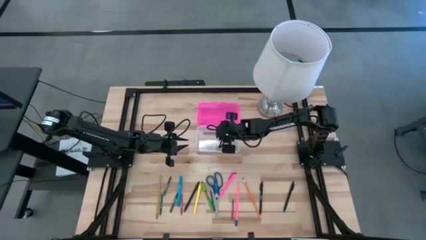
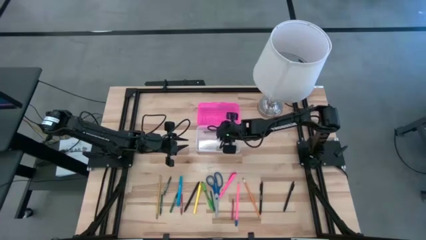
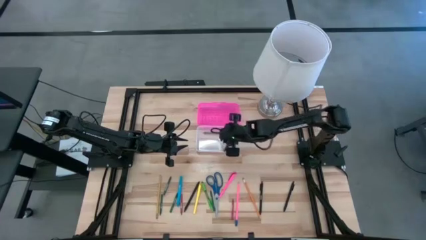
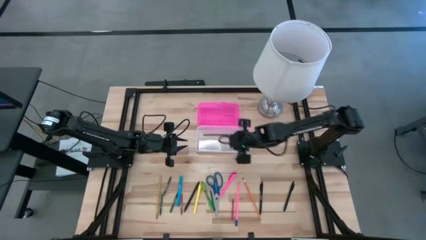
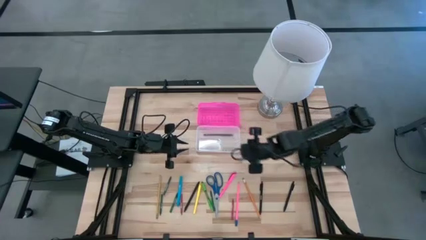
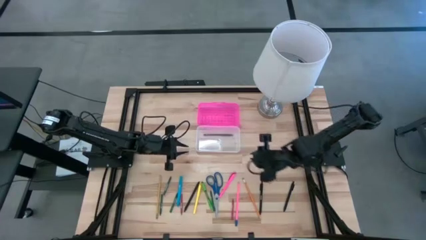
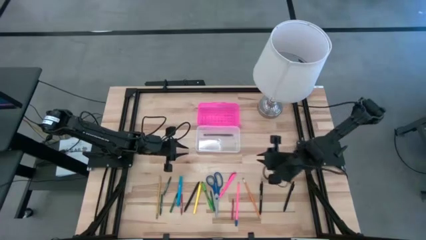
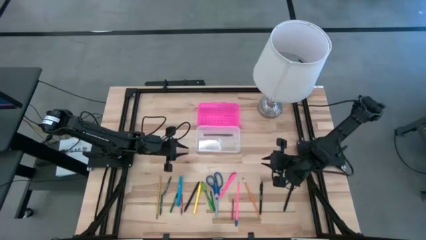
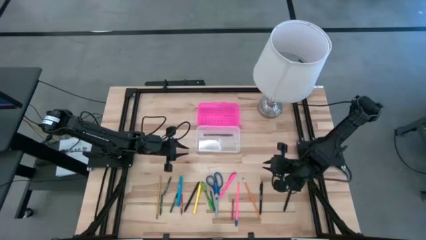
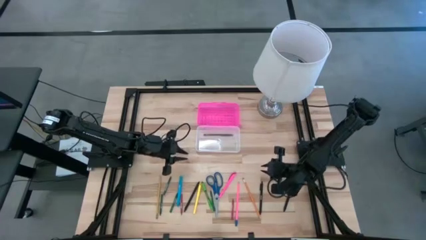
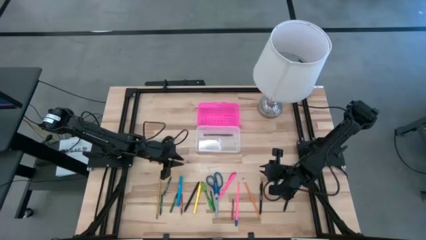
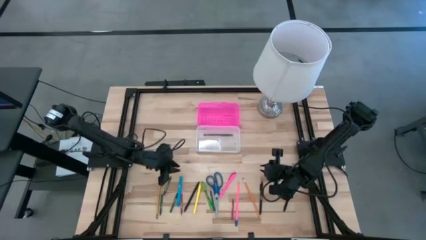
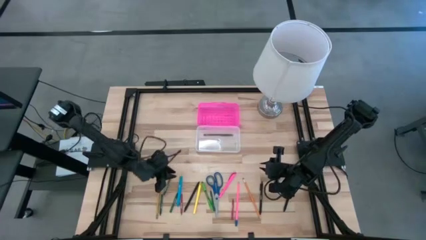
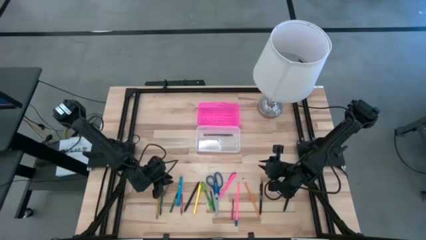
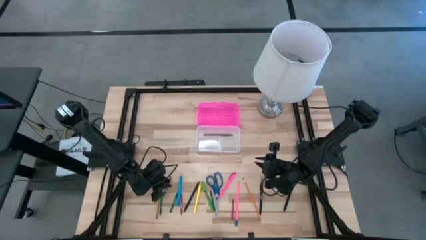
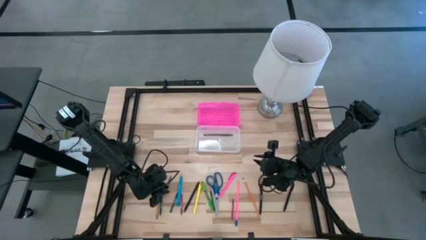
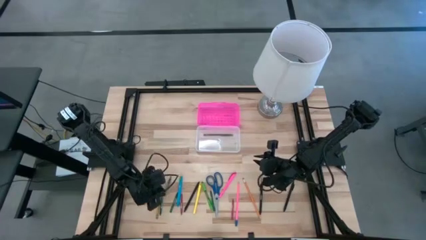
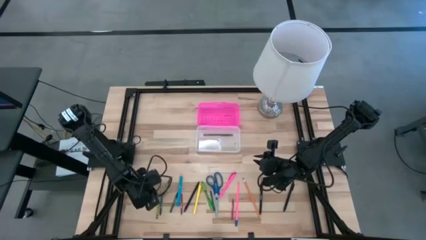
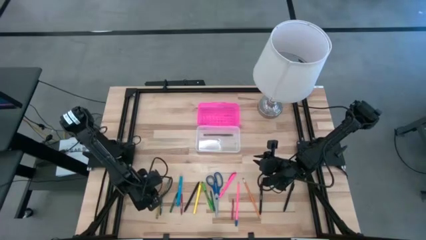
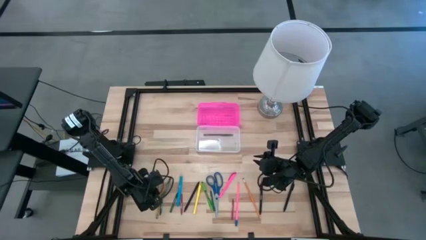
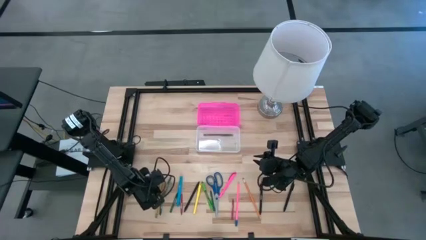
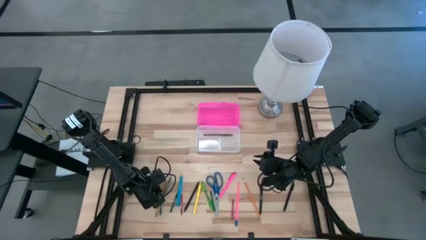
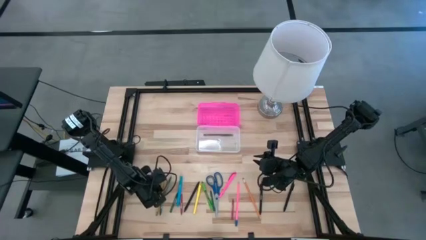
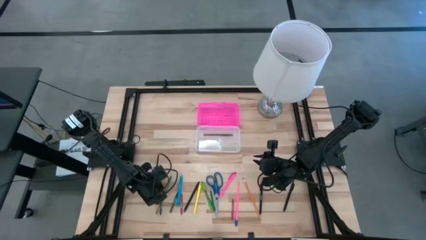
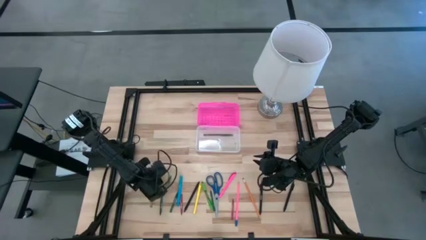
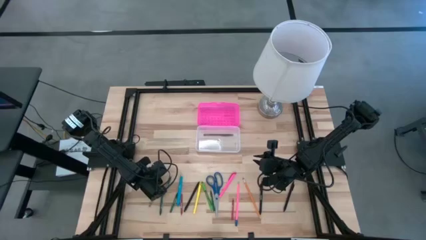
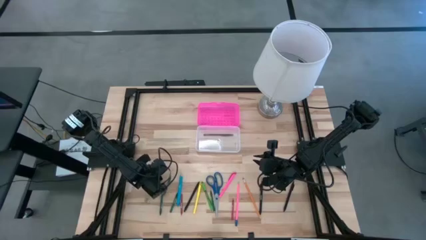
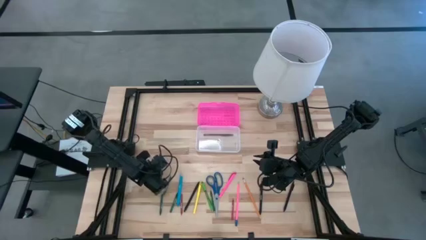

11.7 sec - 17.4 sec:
Task: Pick & place school supplies into a supply box
Put the yellow pencil into the supply box

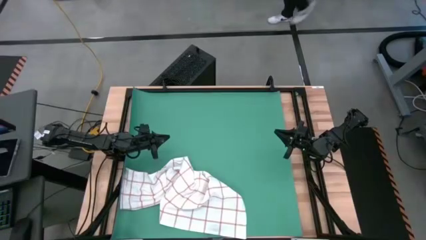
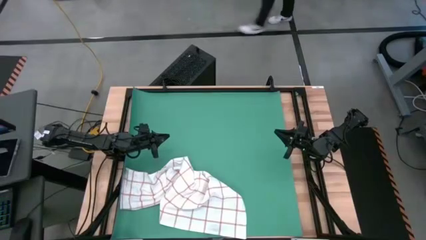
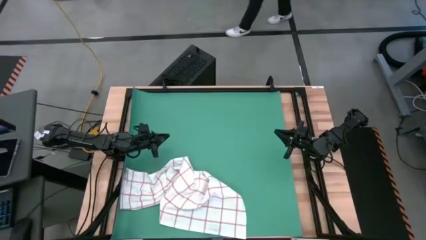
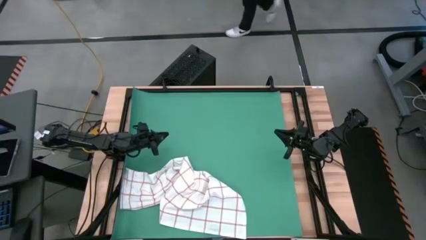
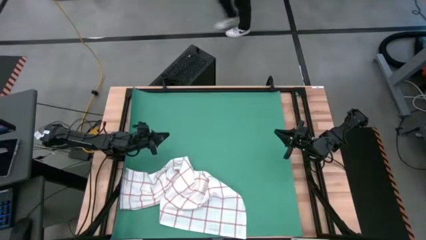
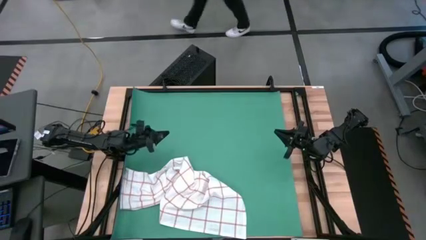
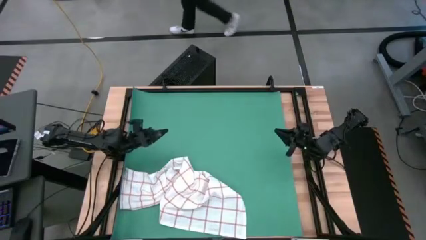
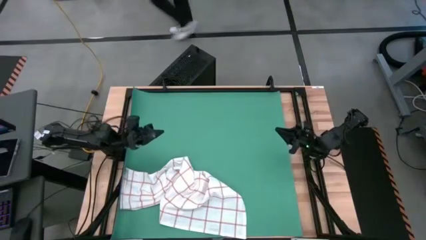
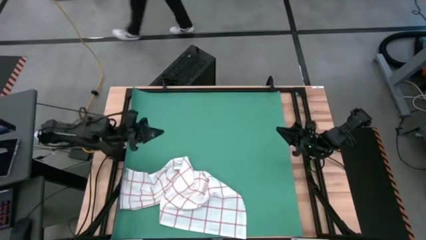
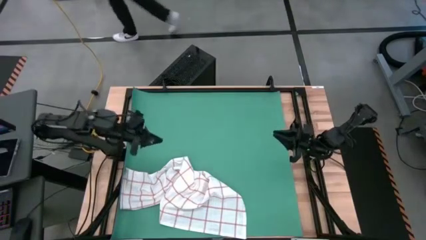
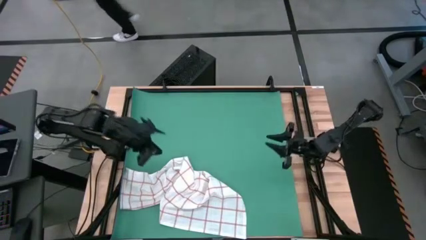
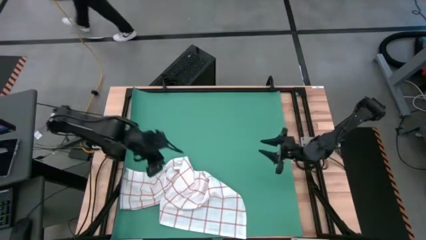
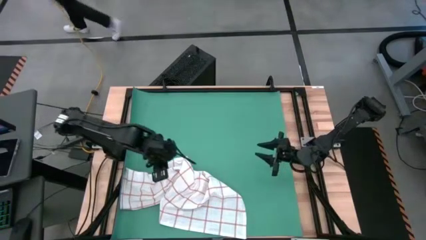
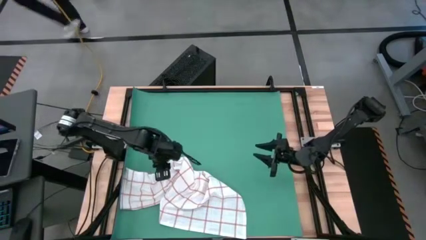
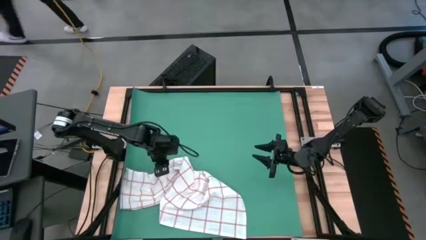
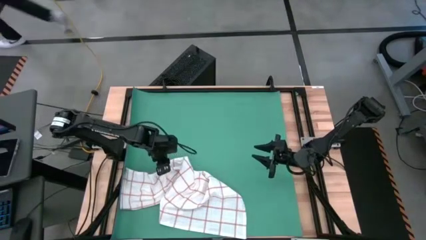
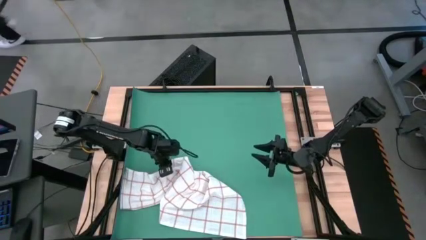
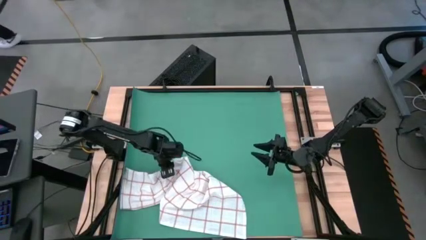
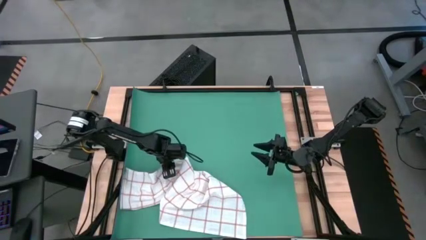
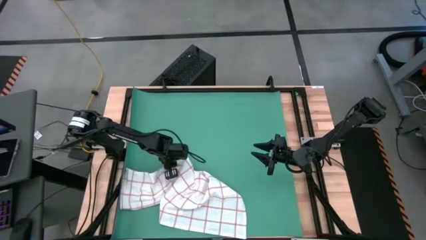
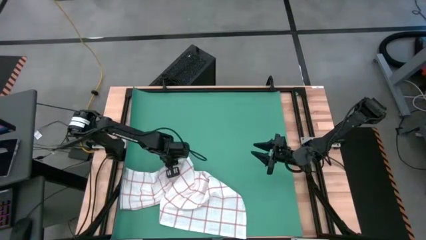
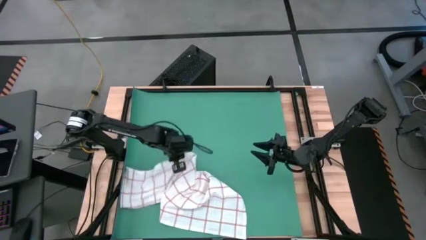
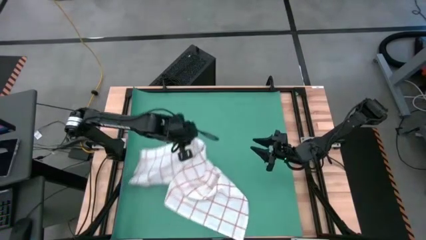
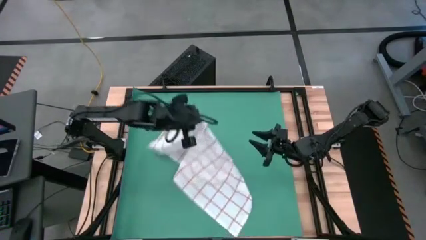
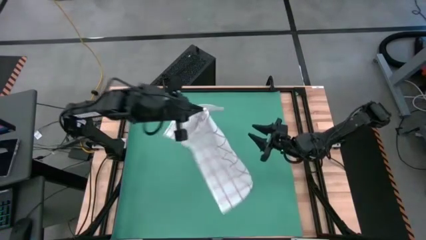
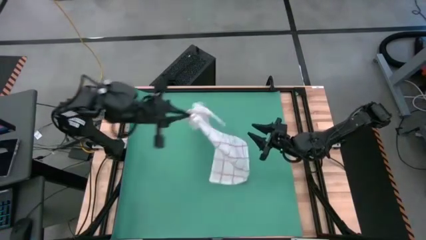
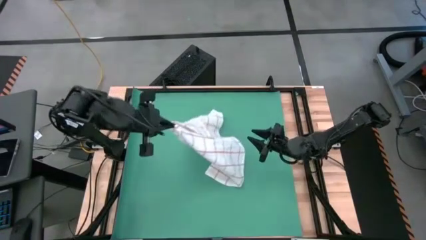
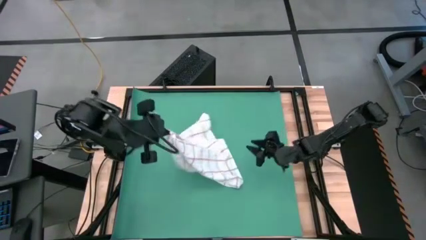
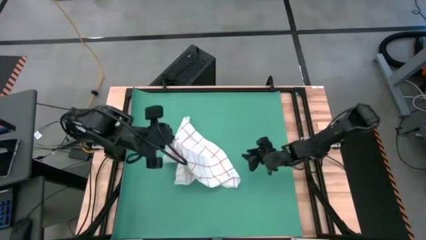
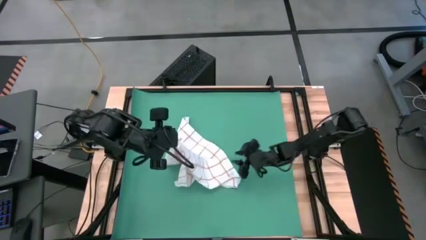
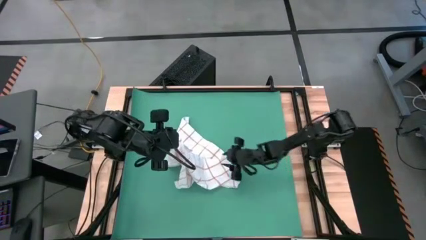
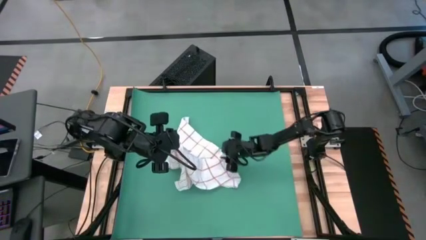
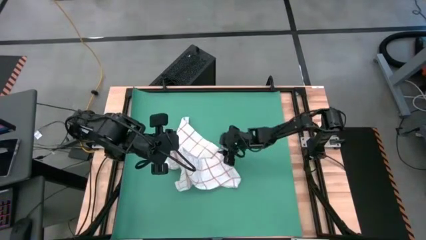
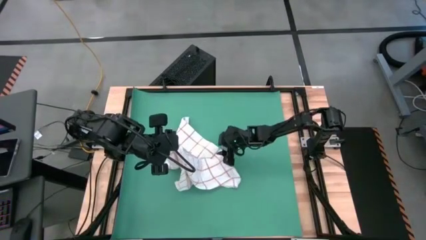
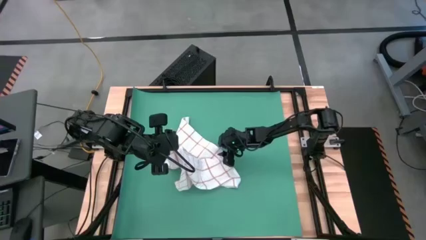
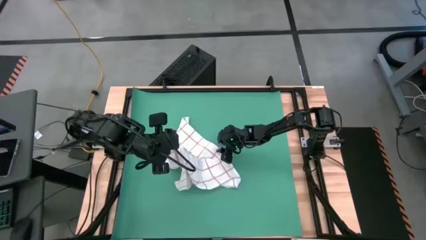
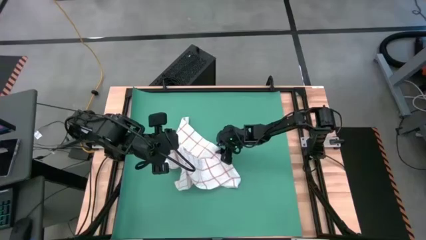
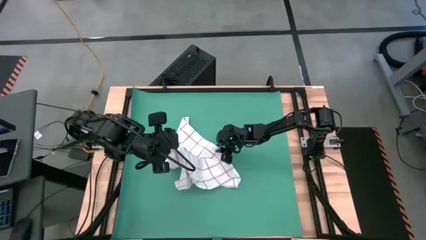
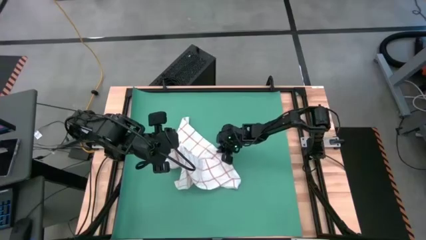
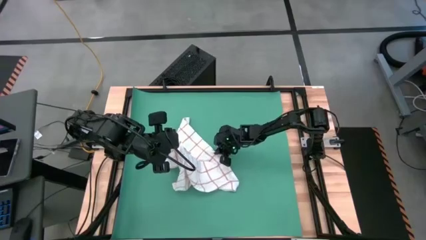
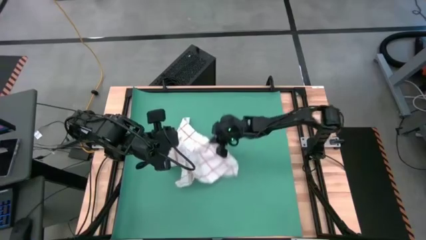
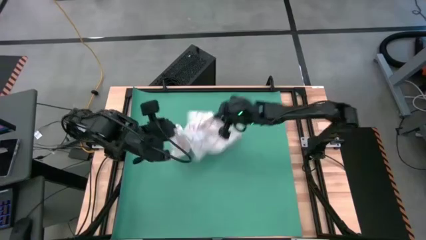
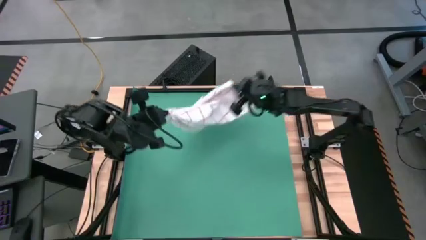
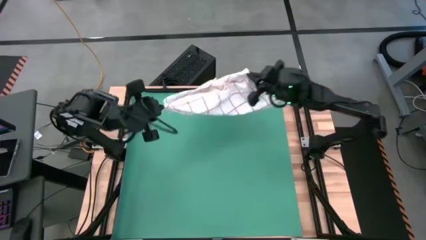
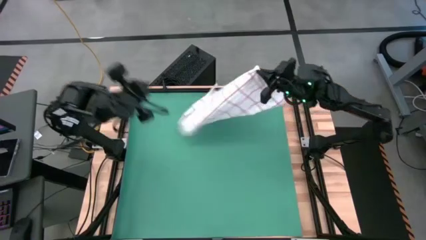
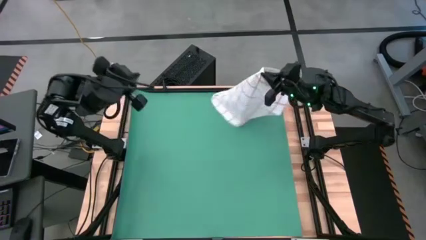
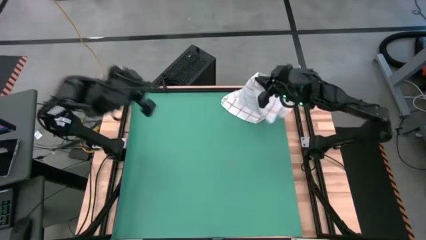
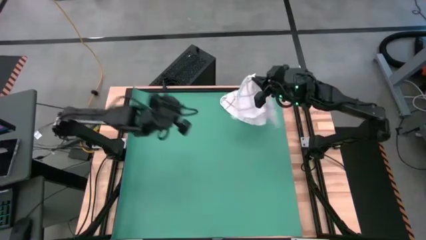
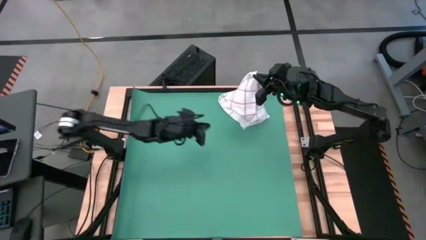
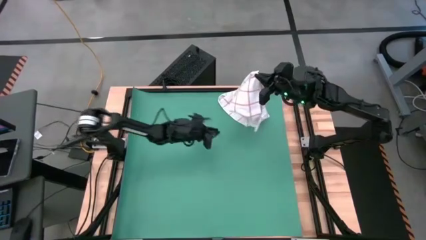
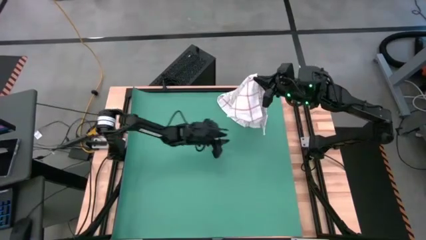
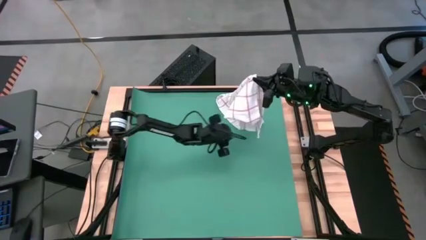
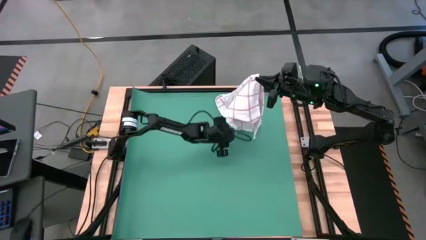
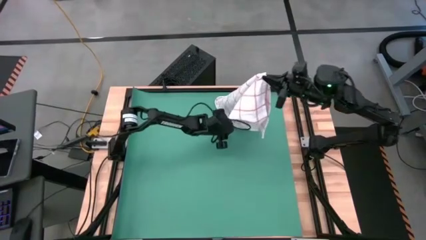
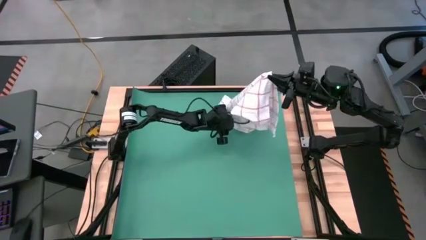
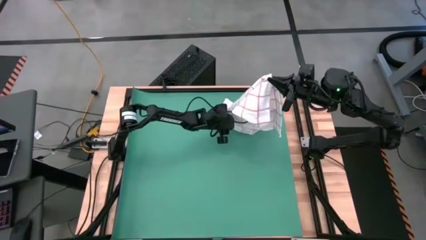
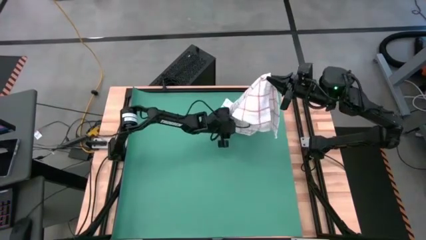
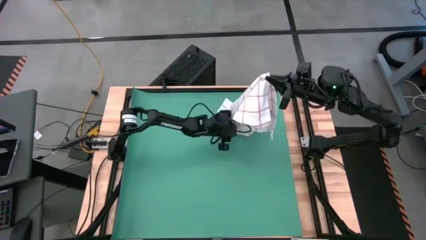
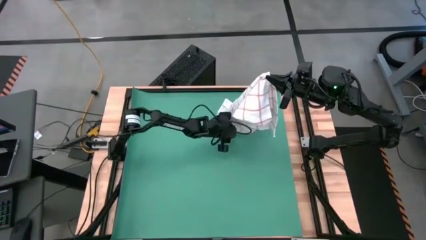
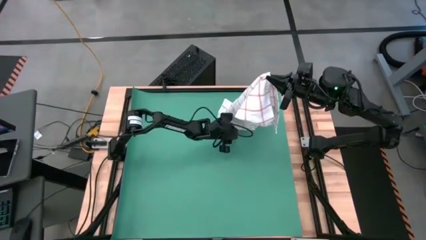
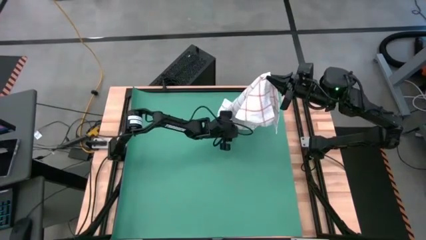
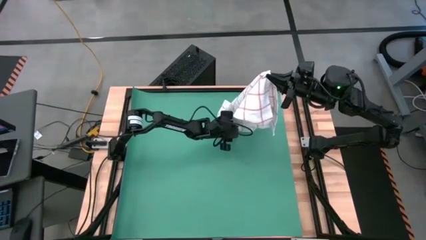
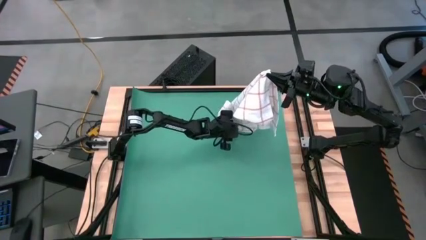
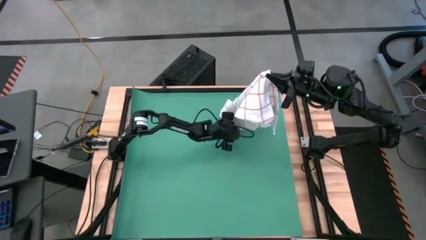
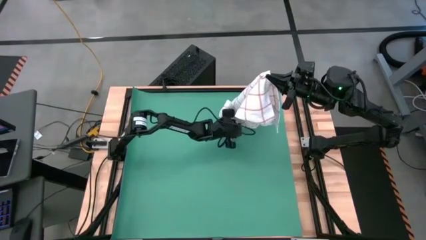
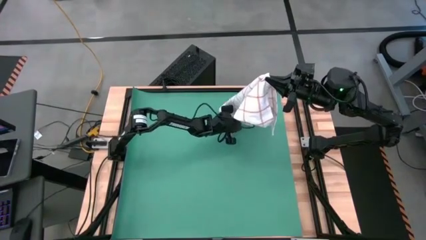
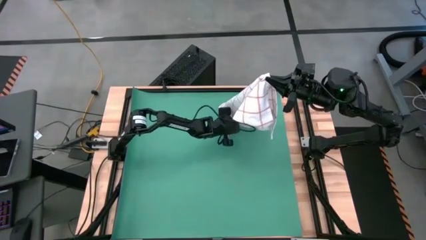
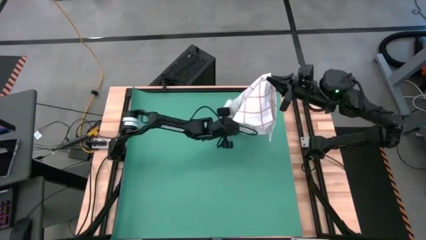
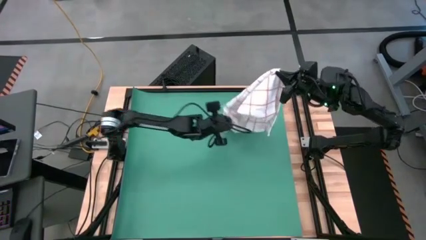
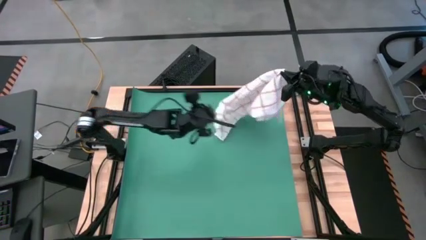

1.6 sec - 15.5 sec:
Task: Roll towel
Roll the white towel
